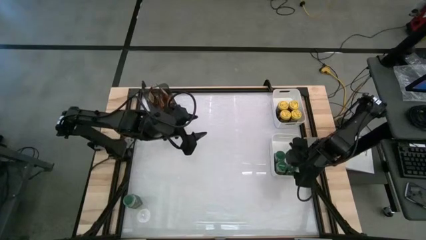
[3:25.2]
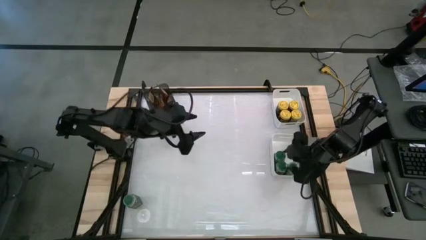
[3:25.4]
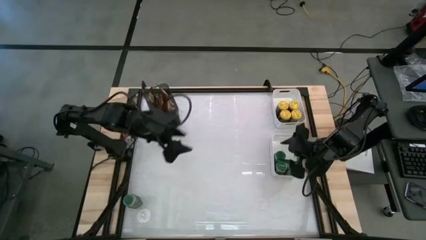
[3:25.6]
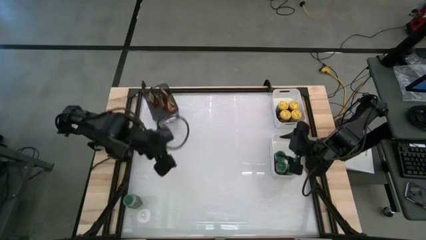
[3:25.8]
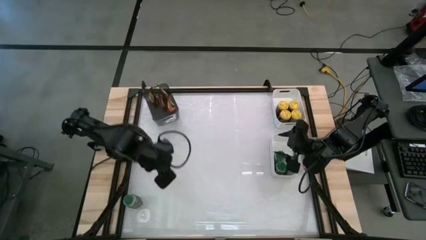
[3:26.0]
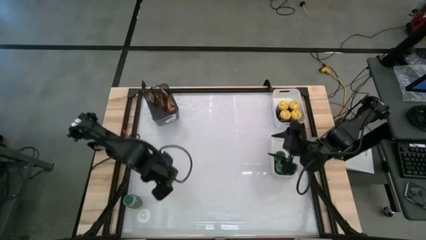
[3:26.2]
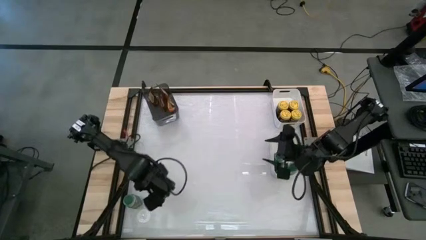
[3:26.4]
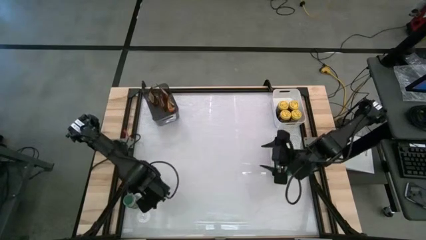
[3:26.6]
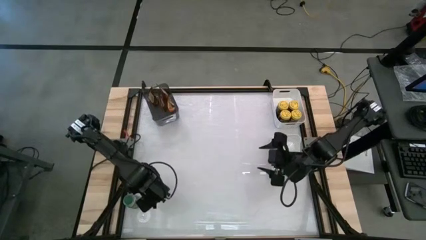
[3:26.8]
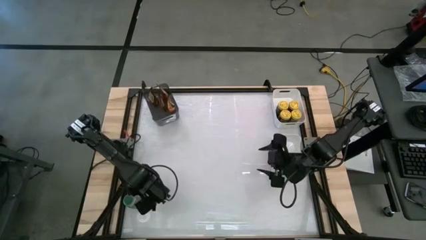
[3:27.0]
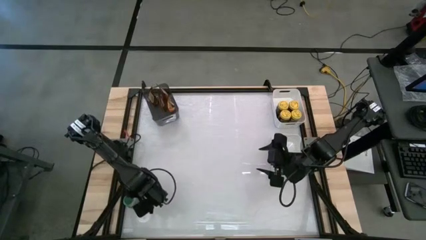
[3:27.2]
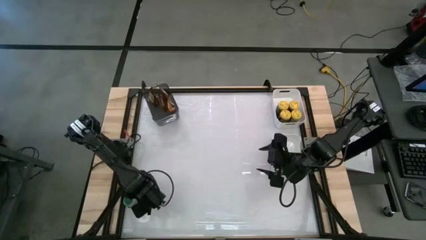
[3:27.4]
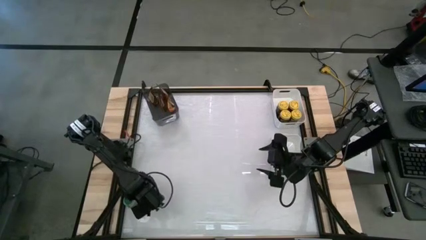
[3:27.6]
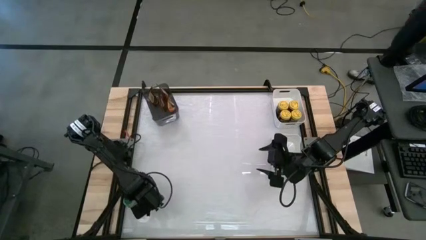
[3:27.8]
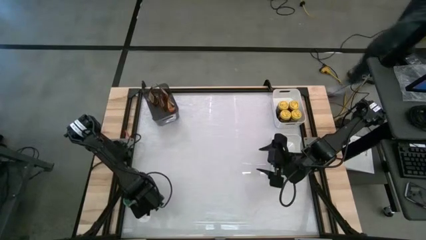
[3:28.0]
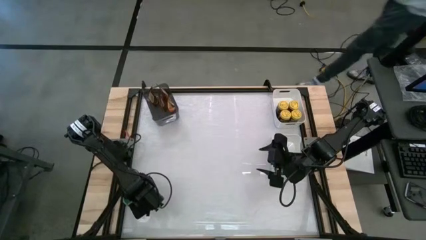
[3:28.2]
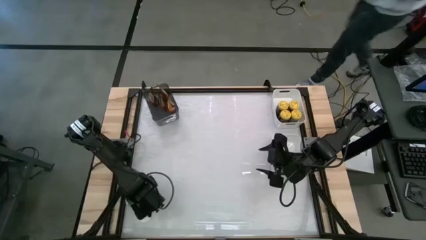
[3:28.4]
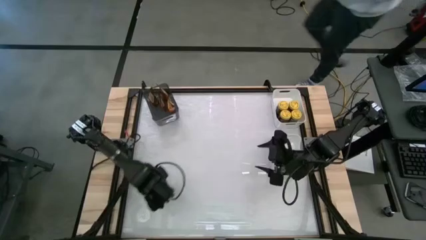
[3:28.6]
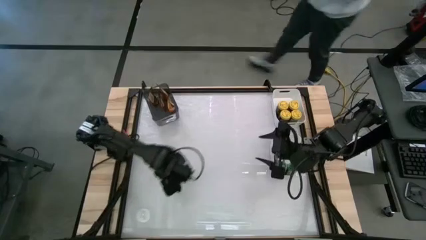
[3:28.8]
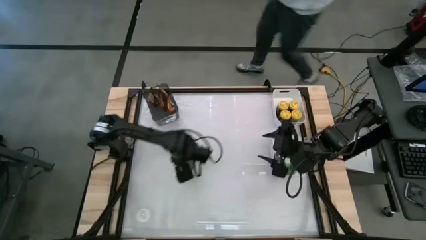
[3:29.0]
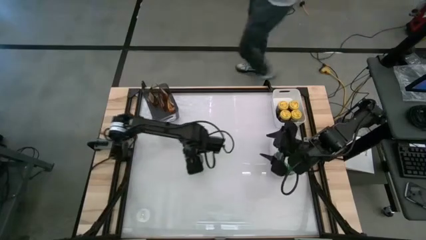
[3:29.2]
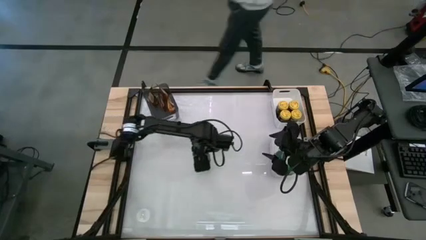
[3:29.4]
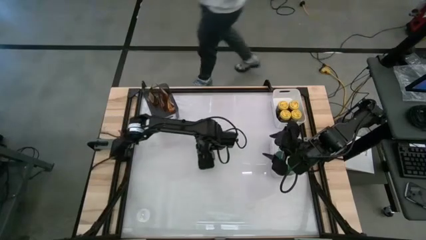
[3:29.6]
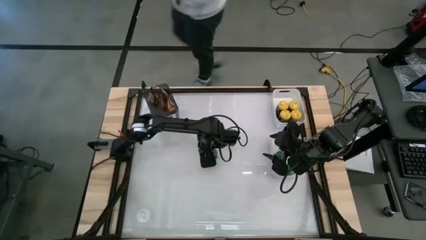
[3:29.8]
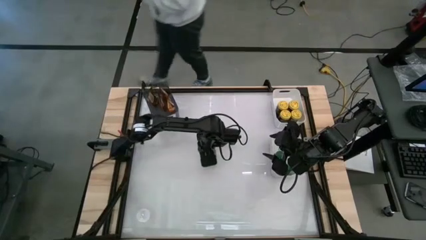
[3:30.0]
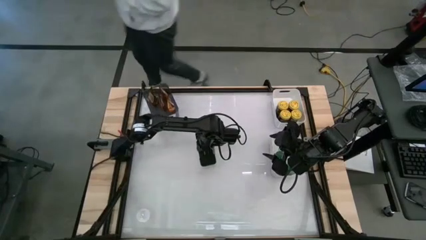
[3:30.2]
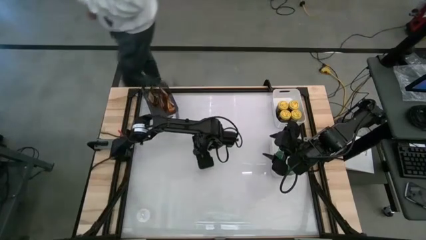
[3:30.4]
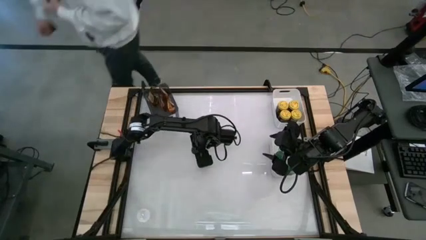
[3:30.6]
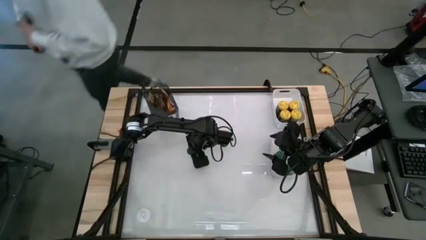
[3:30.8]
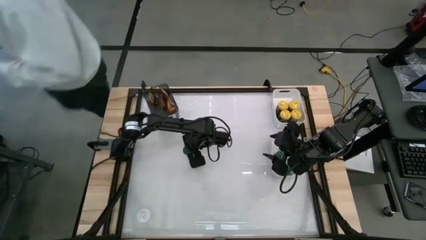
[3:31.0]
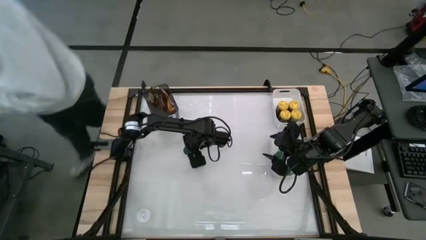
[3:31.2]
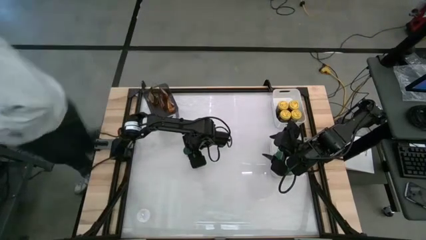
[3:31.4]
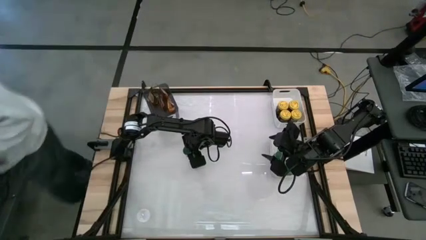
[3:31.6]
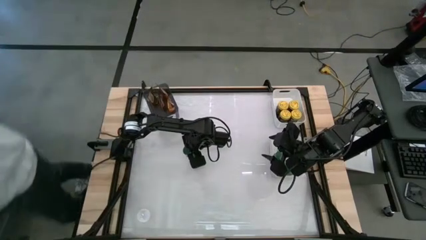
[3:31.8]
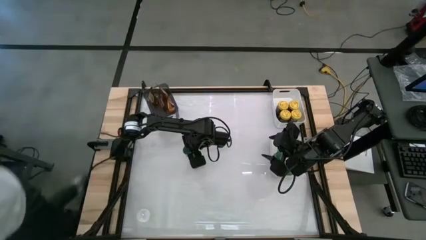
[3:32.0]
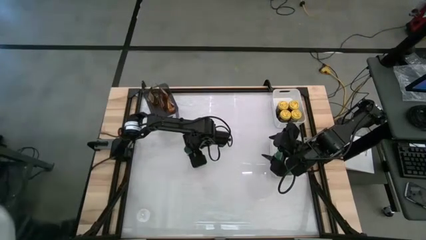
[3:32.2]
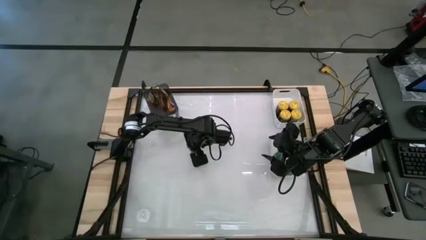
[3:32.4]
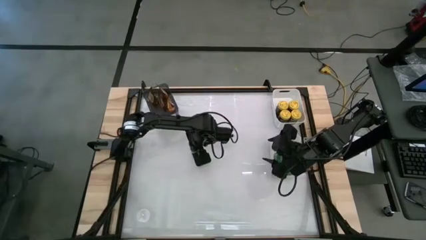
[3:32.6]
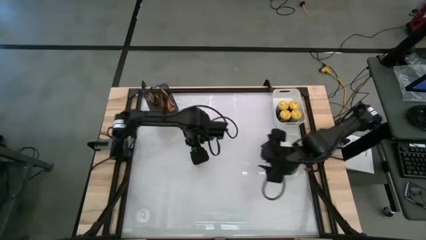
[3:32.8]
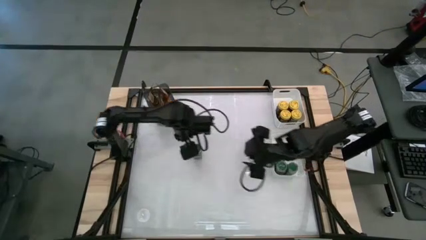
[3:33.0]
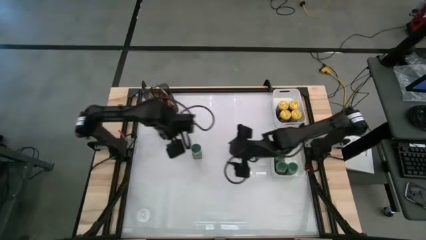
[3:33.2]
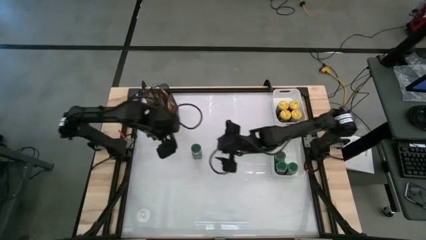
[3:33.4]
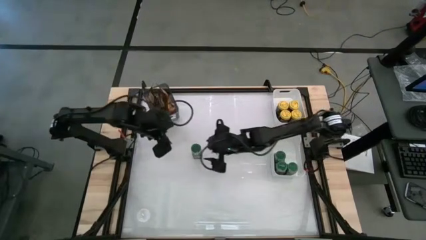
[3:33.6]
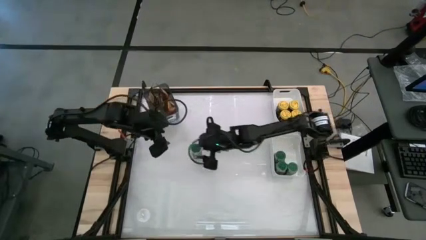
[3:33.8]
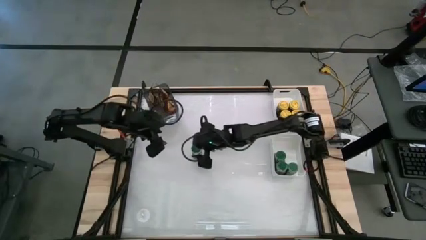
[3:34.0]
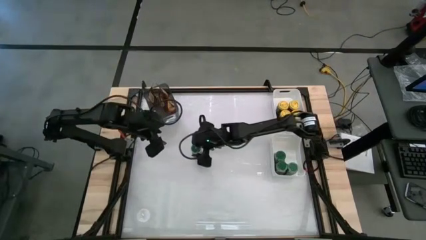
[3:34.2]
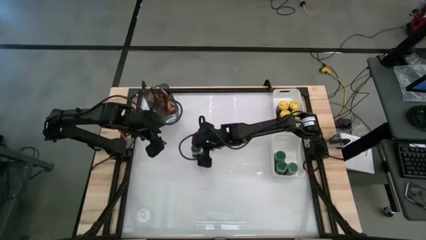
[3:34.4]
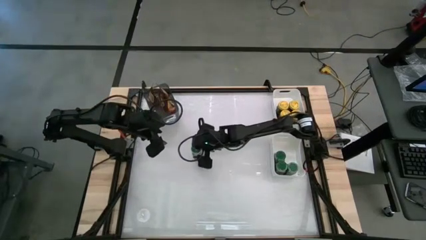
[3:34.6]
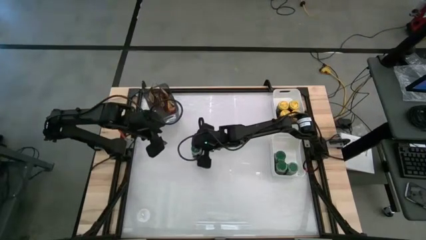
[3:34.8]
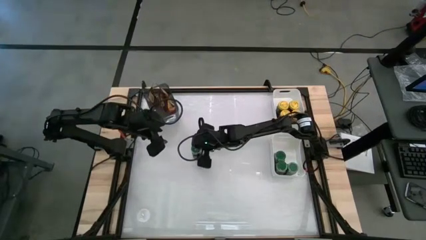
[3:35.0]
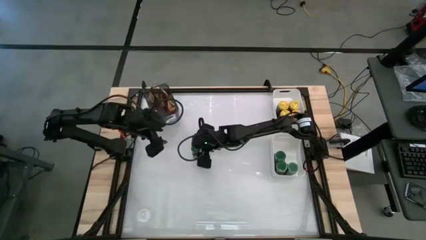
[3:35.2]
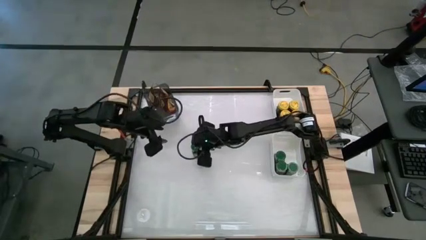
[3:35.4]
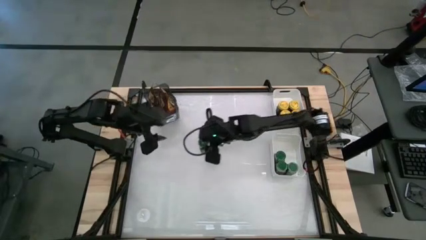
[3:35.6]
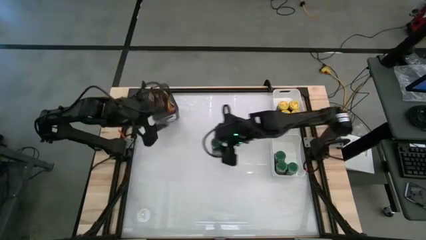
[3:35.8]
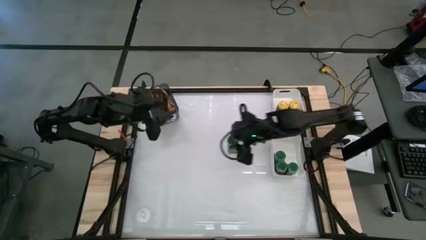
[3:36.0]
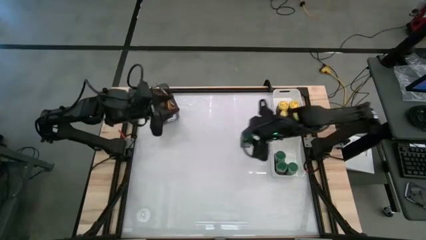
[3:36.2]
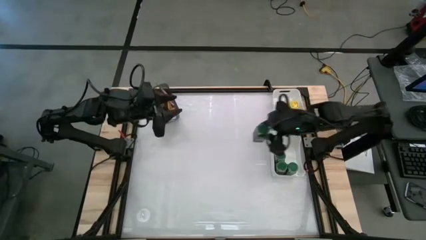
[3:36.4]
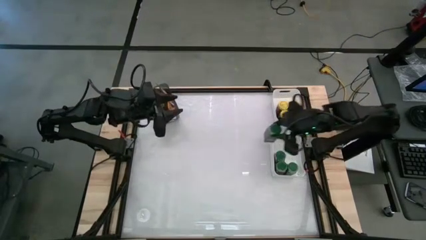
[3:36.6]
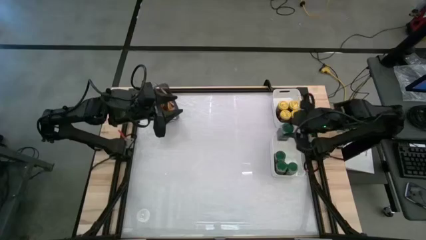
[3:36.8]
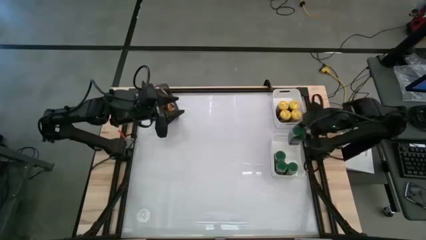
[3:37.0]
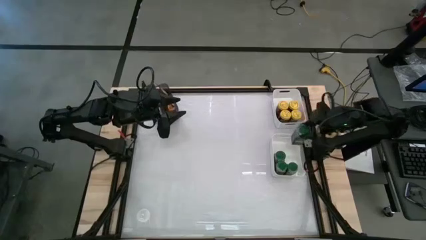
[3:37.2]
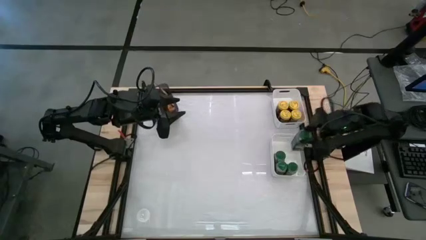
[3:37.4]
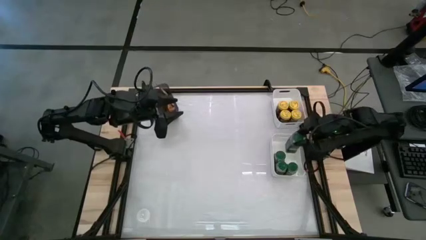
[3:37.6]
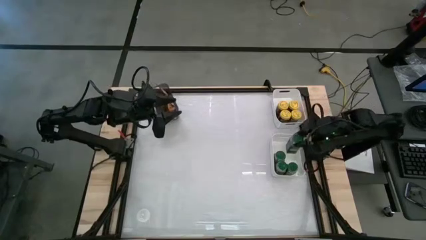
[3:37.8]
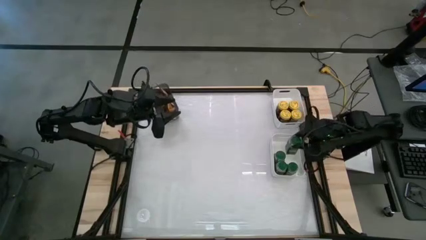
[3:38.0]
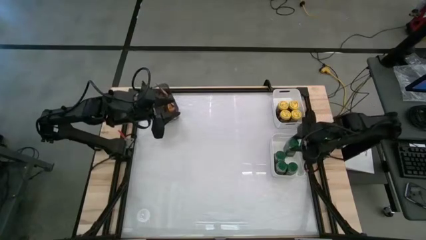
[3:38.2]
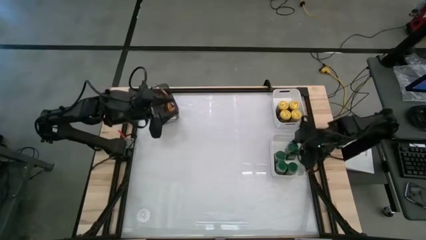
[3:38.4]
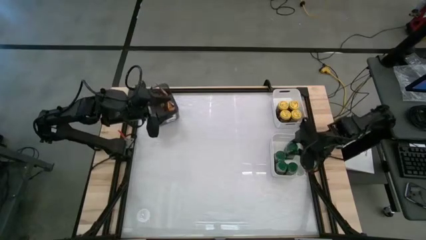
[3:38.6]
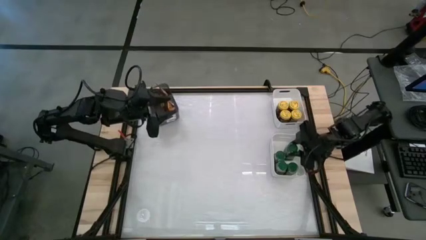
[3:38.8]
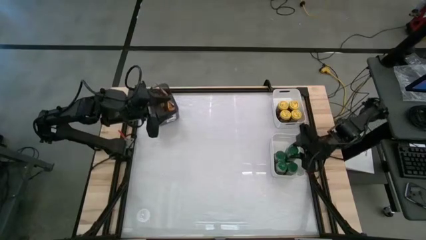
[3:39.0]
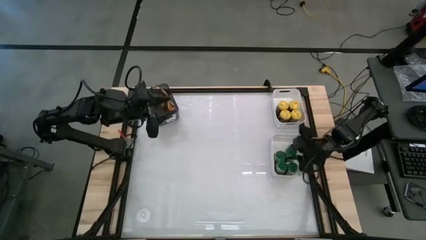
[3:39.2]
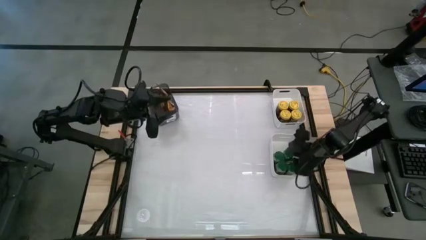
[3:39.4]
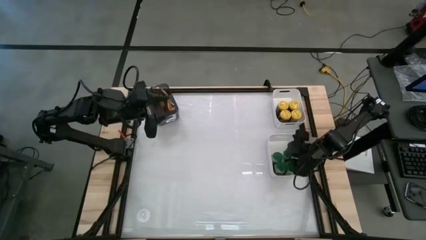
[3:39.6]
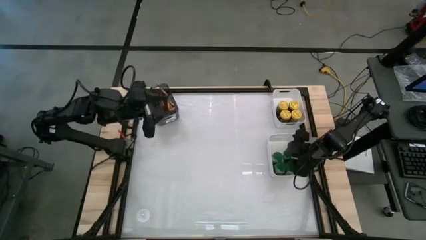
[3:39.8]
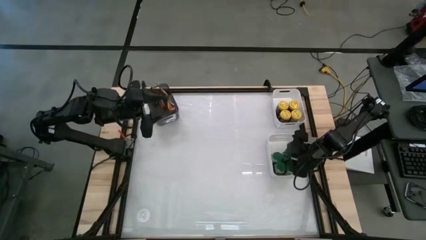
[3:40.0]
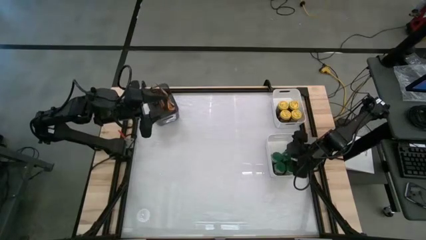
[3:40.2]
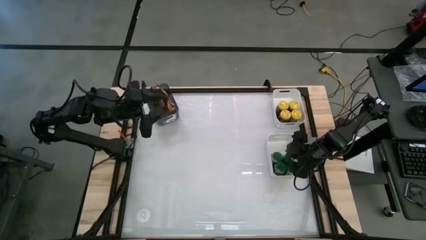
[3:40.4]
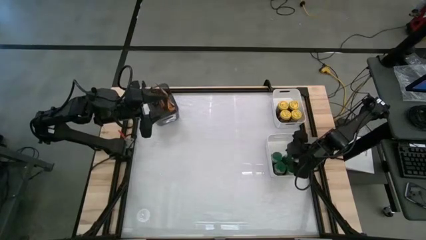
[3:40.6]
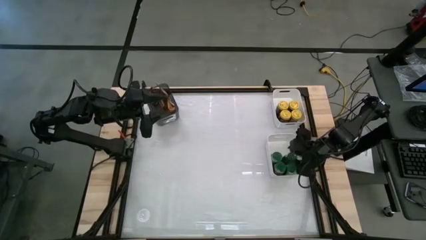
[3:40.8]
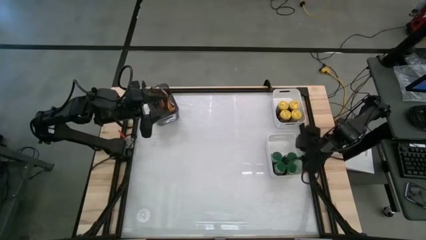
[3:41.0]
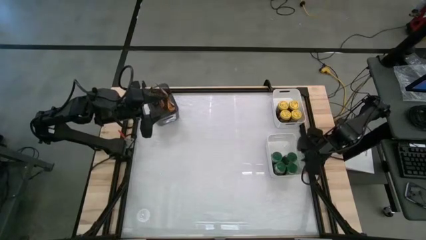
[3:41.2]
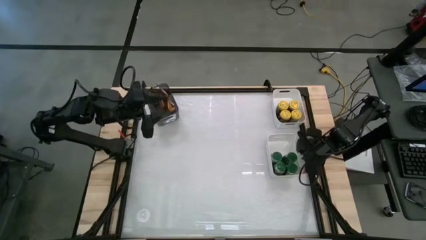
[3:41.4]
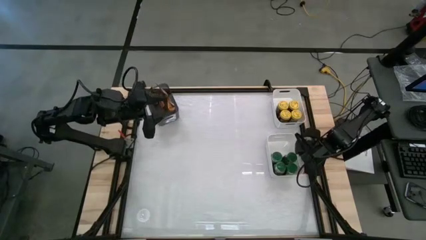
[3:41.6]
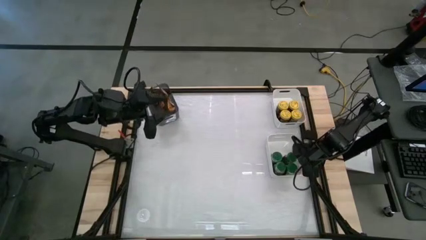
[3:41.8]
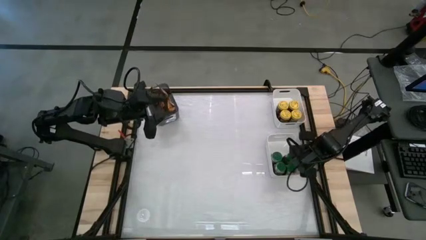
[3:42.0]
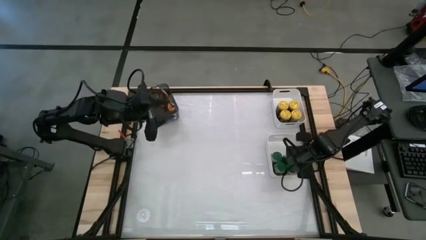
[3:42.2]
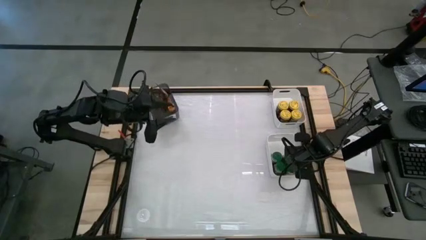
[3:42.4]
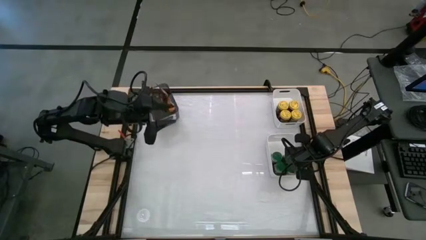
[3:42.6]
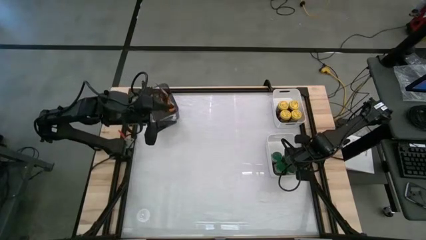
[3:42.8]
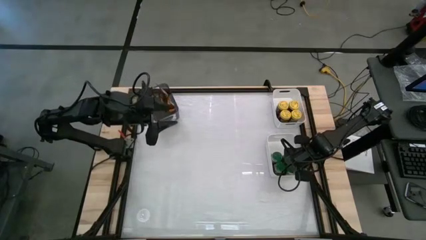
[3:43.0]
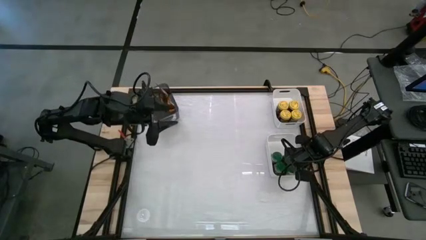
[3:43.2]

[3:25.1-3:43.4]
Task: Sort spices by type
Put the green seasoning bottle into the bottom white bin
